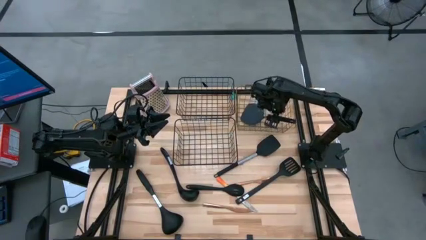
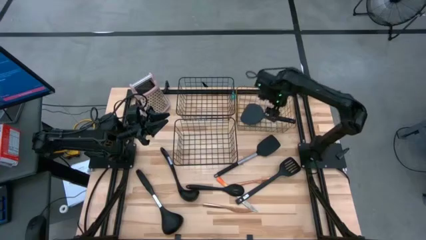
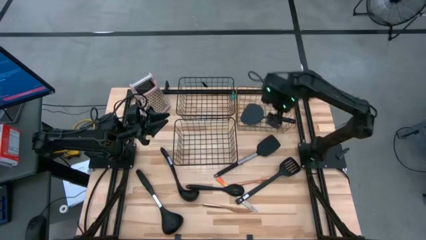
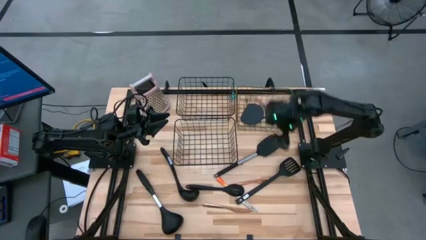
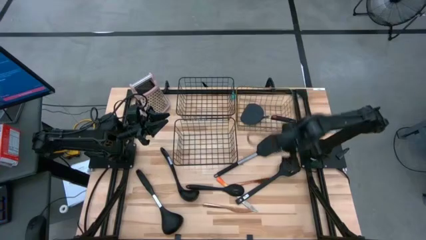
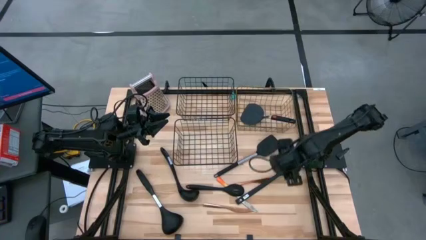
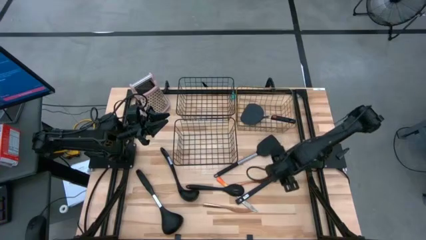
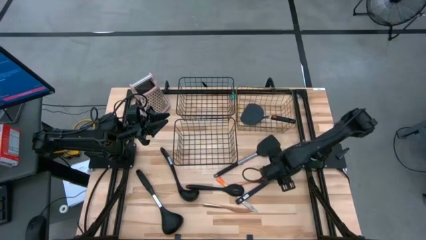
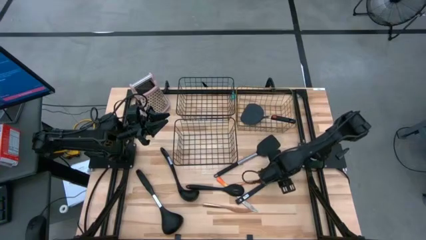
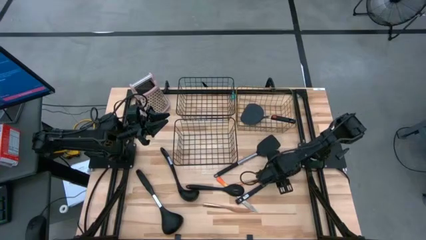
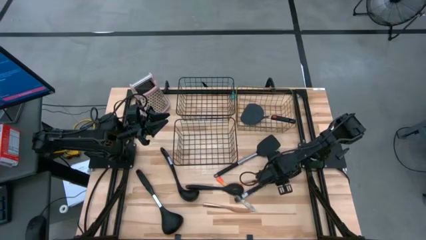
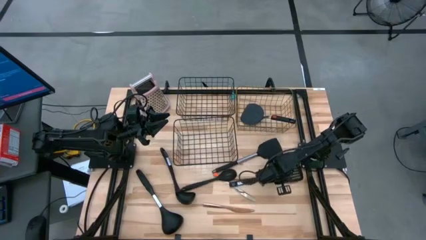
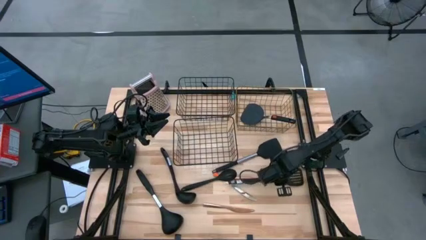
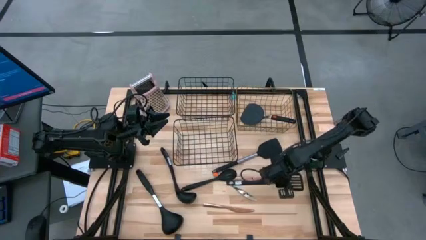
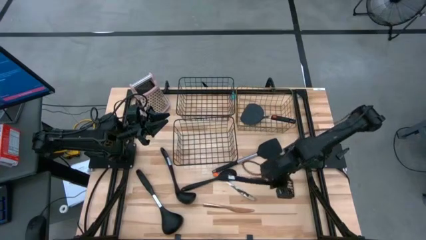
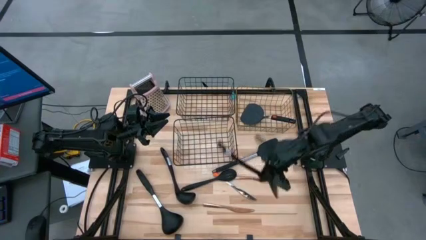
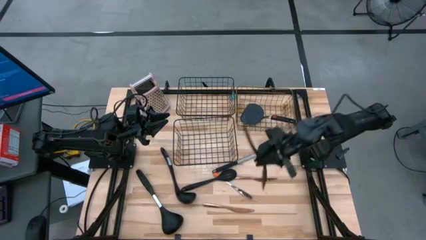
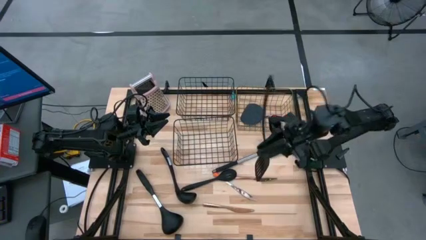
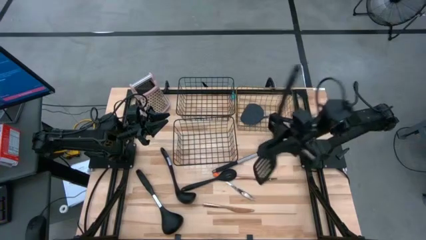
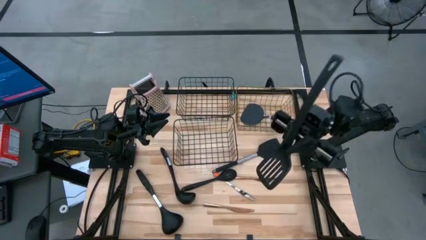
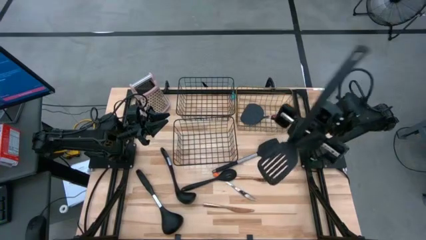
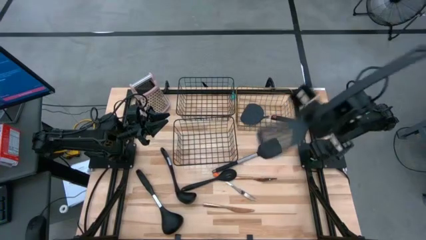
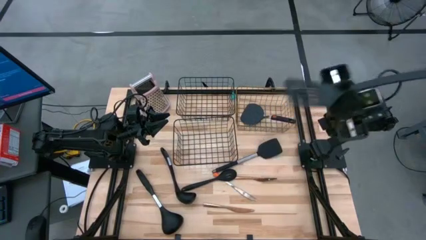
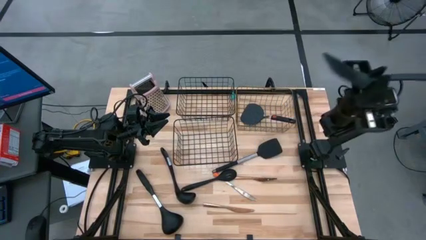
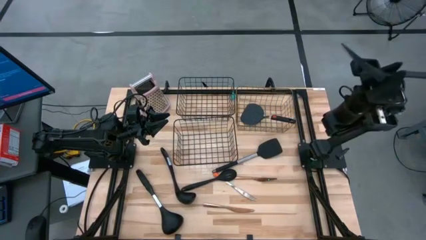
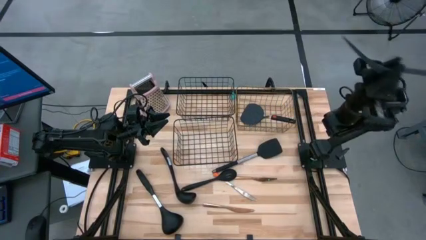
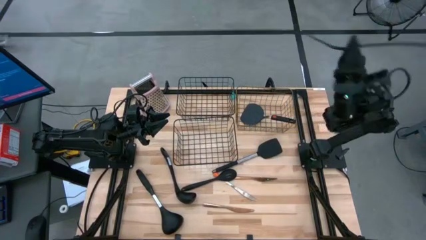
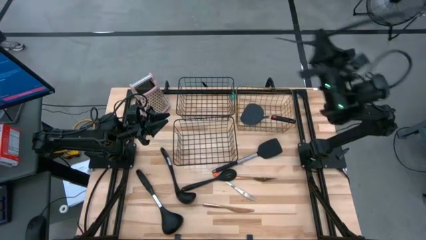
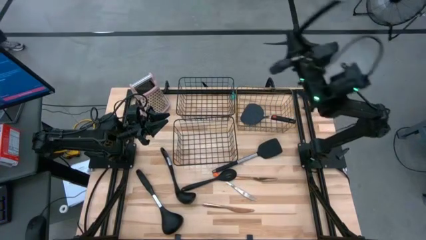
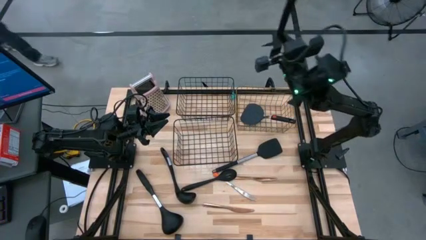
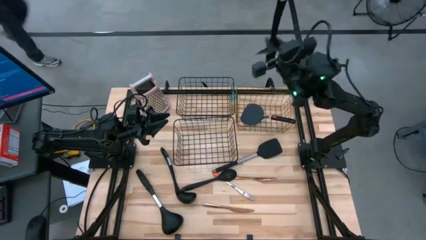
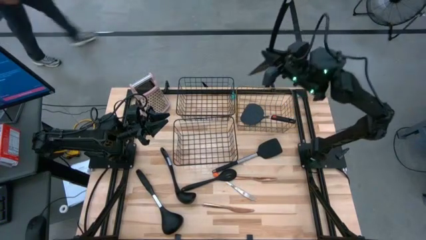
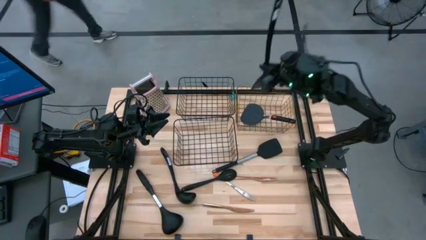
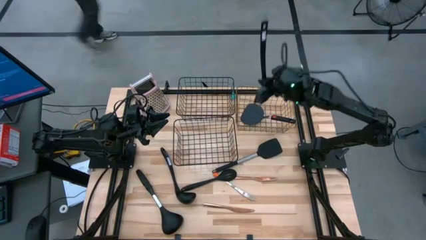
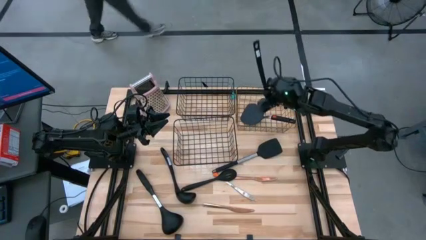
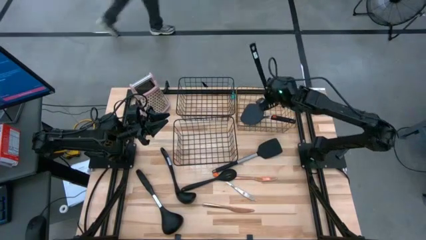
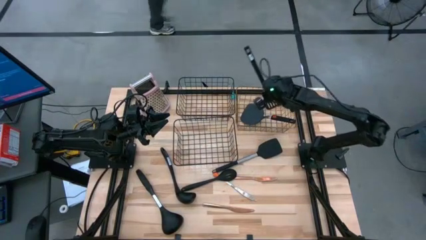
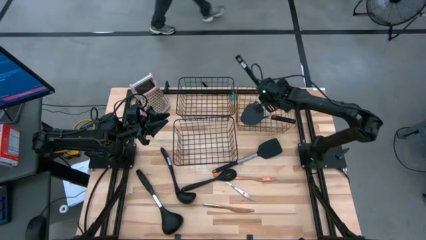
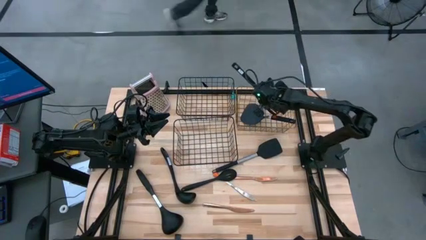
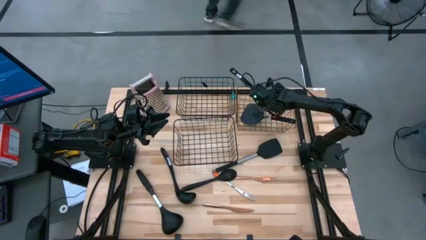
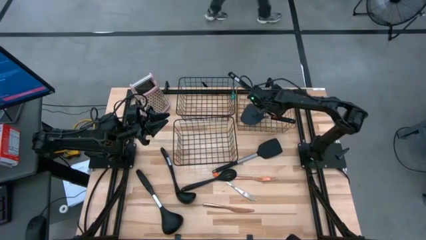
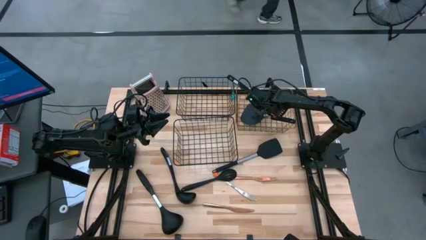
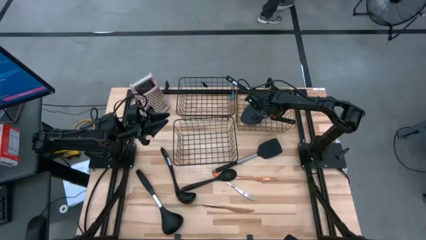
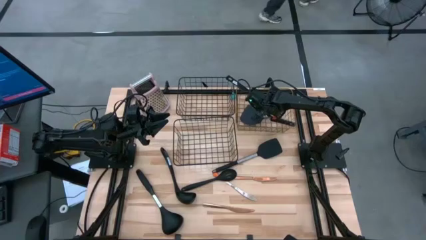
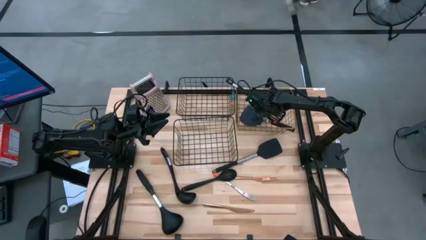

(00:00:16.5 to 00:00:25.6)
Task: Pick & Place Kitchen Items
Put the slotted spatula into the top right wire basket

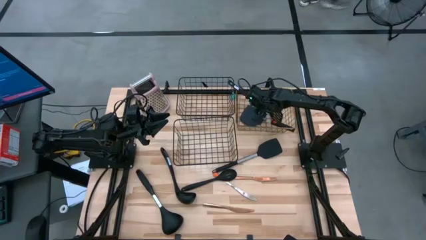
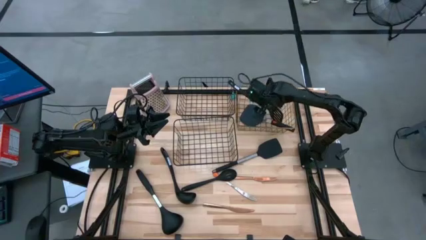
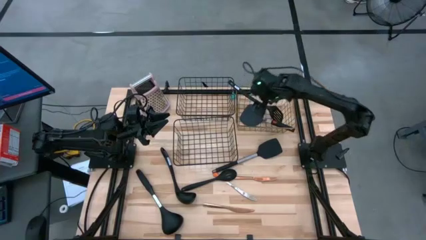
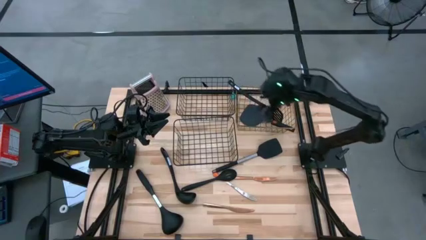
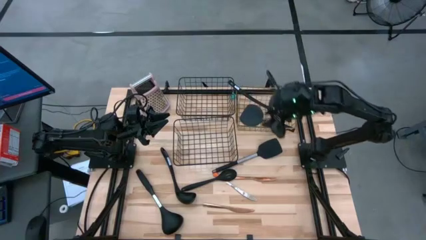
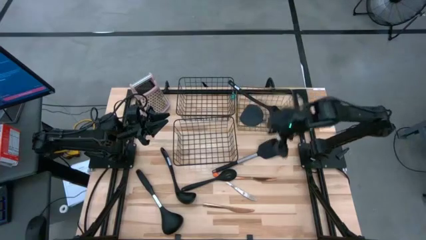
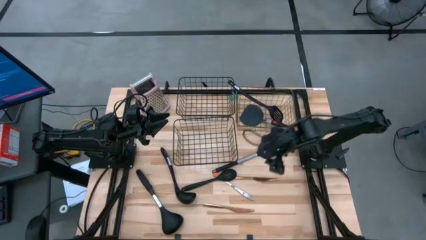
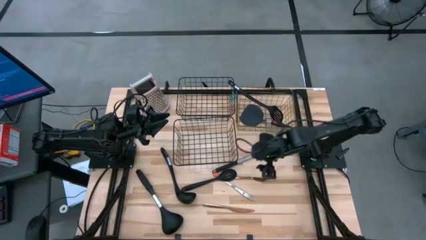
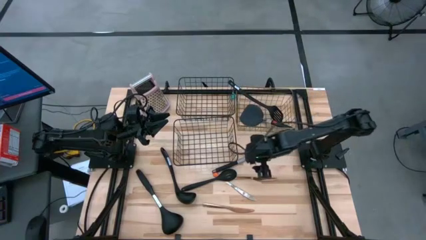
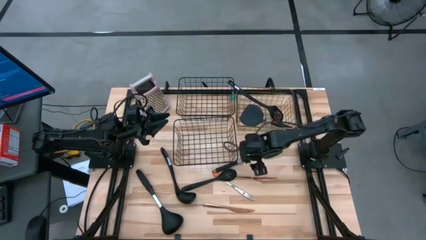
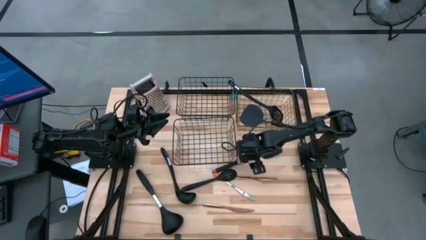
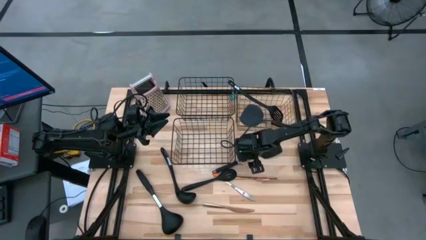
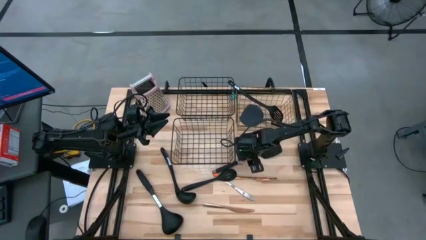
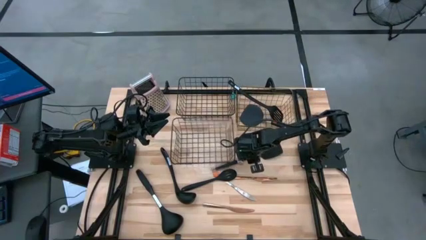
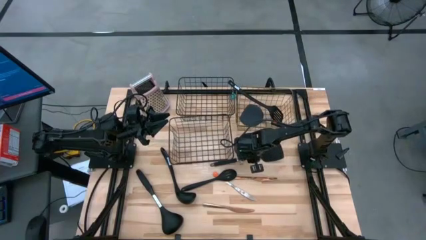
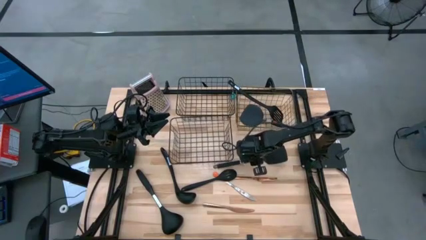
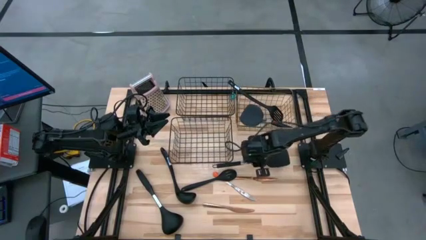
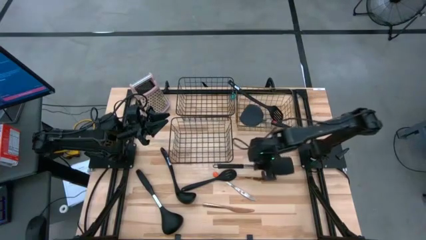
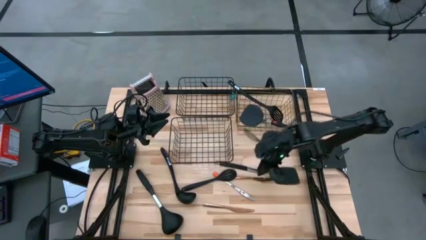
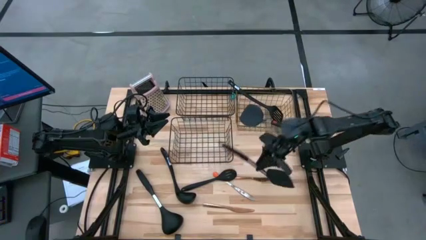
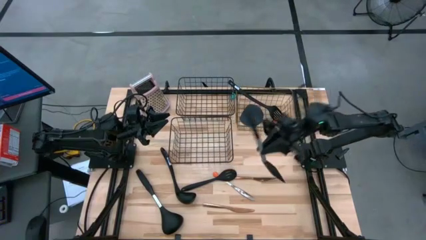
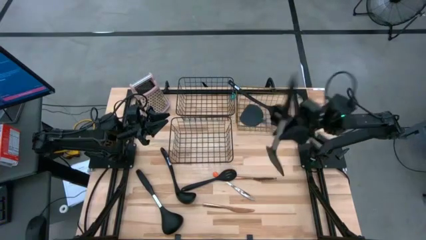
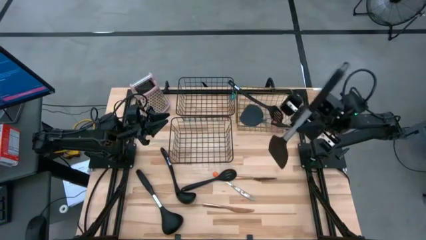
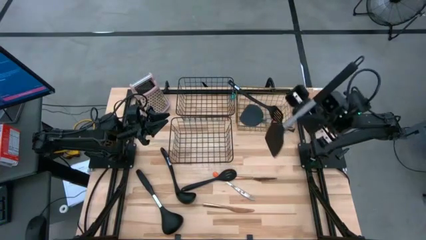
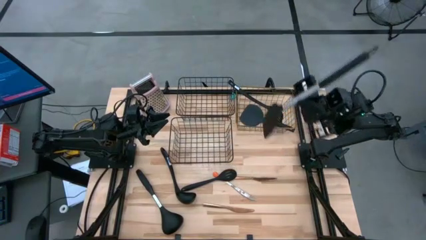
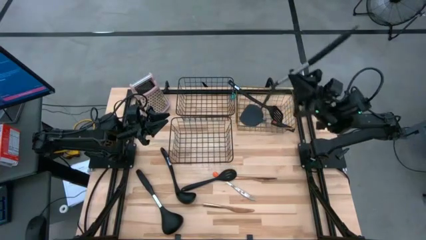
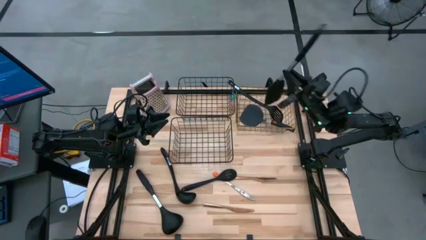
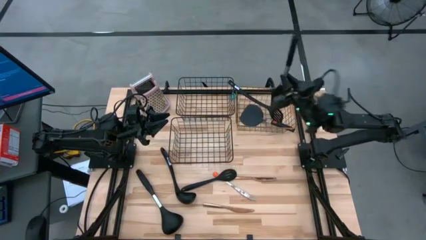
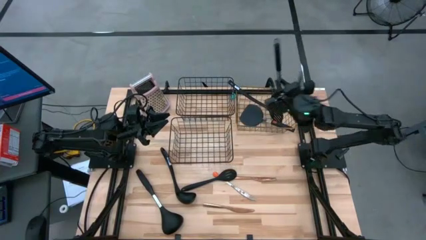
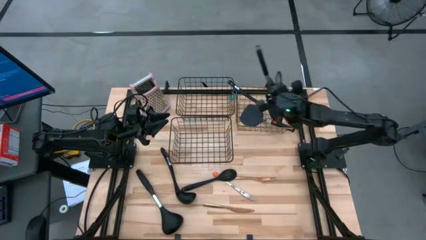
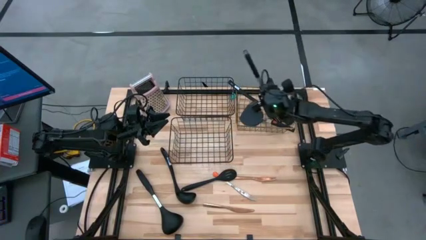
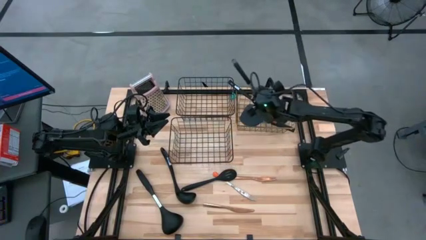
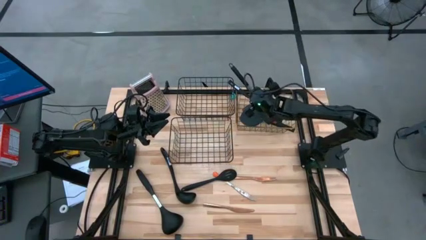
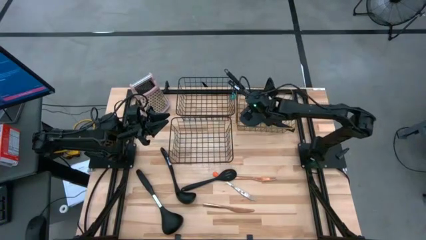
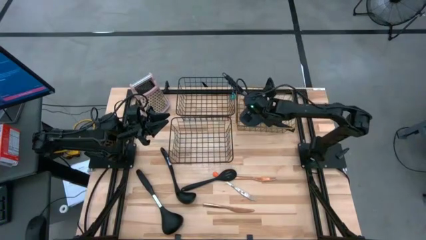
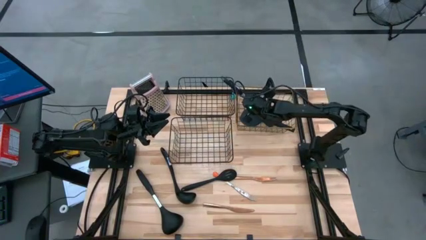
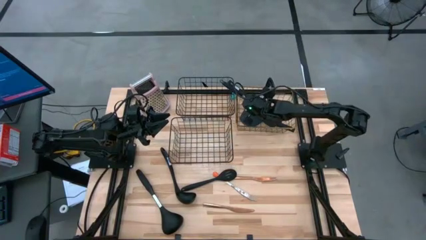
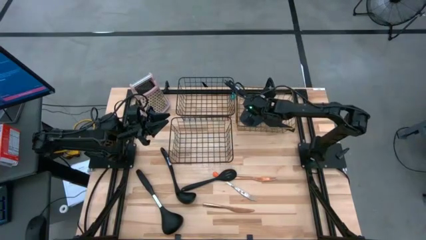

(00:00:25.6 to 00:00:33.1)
Put the spatula into the top right wire basket

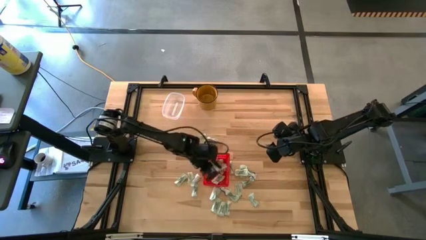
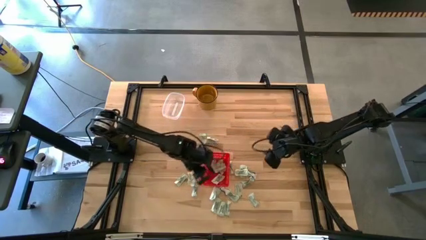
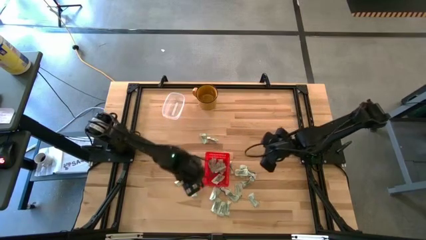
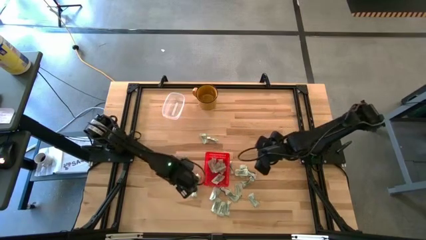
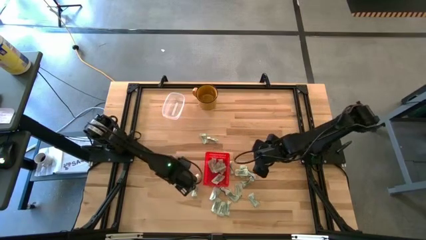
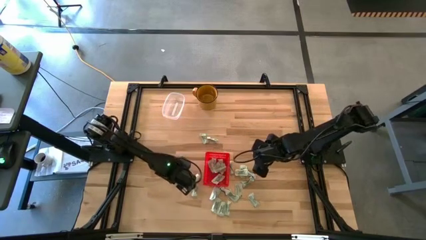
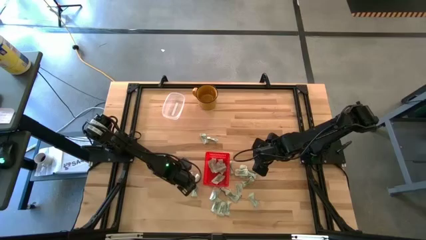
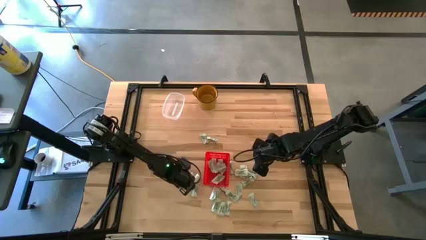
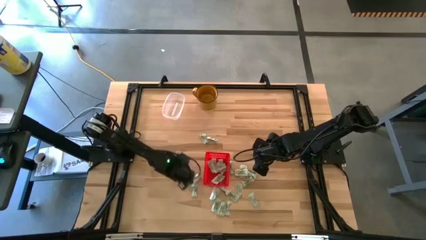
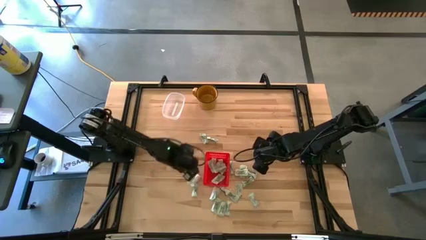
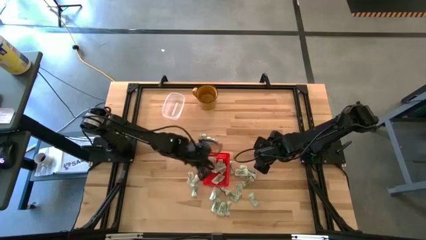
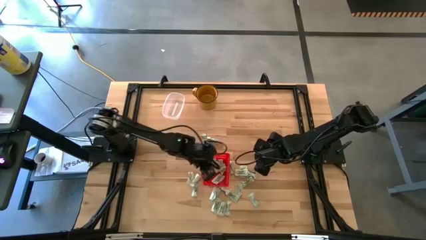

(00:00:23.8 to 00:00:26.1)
Task: Pick and place Stevia / Truvia into bins
Put the white stevia packet into the red basket
